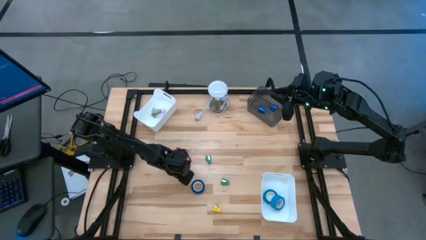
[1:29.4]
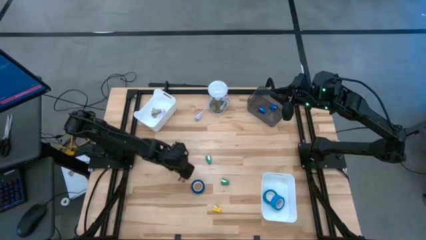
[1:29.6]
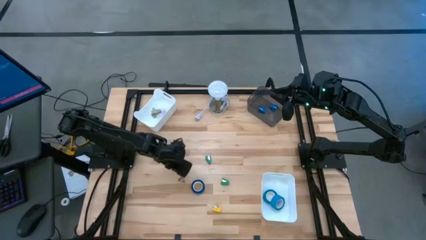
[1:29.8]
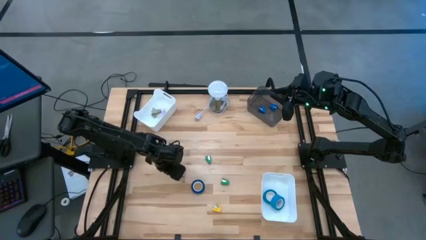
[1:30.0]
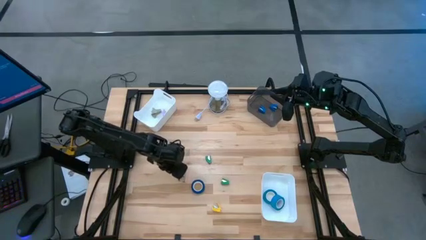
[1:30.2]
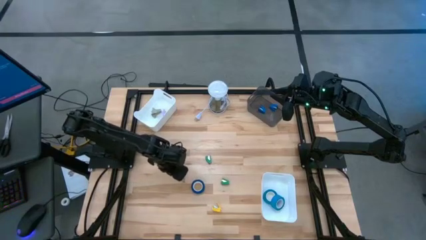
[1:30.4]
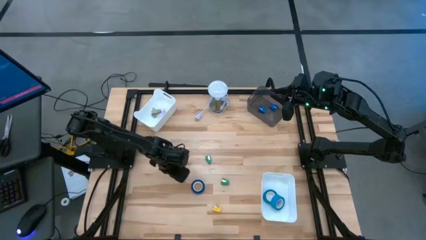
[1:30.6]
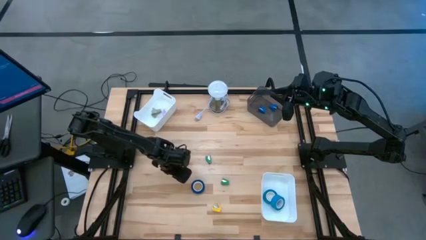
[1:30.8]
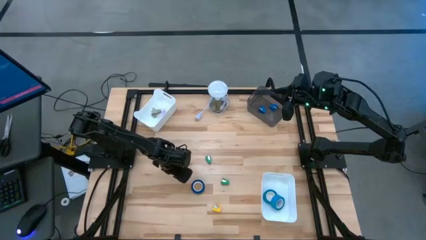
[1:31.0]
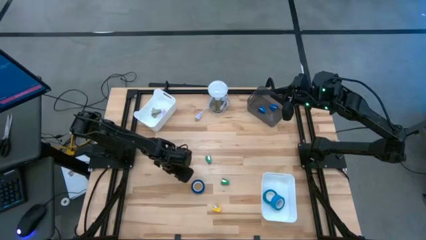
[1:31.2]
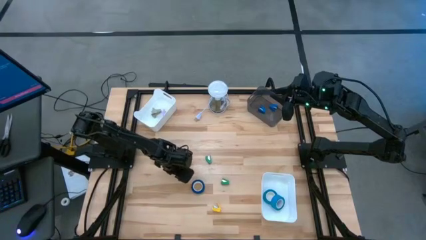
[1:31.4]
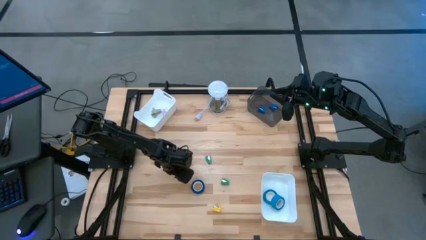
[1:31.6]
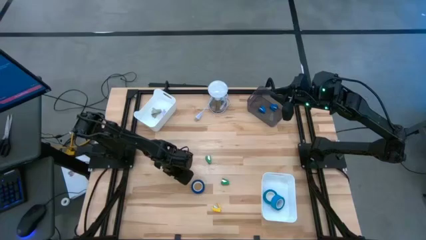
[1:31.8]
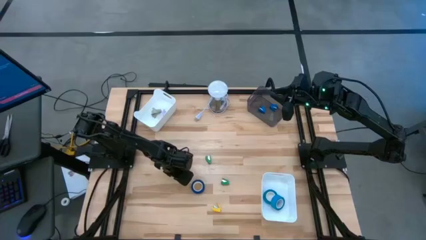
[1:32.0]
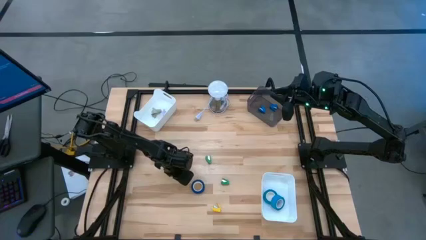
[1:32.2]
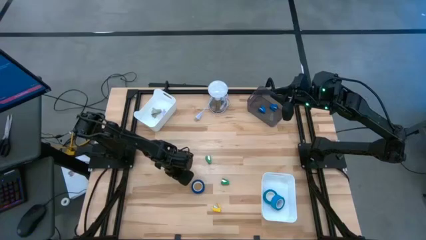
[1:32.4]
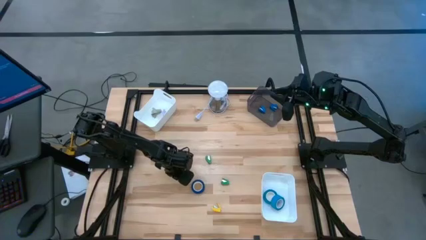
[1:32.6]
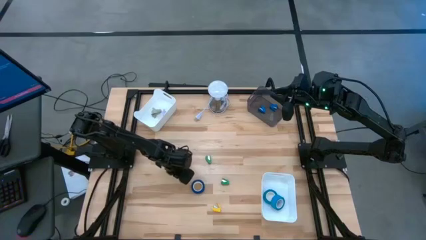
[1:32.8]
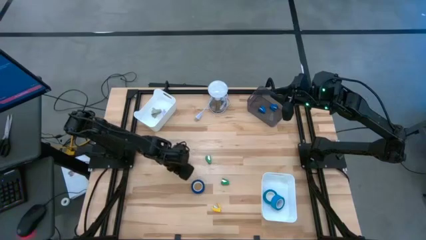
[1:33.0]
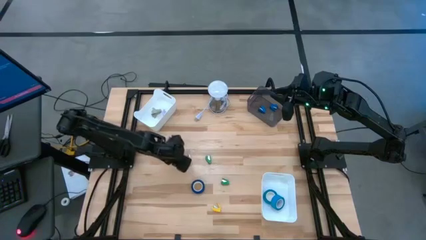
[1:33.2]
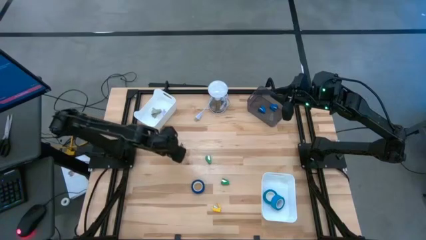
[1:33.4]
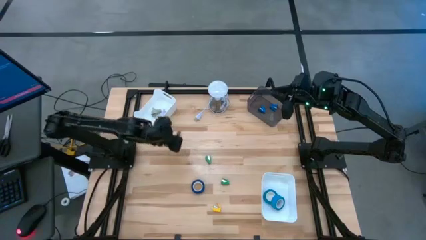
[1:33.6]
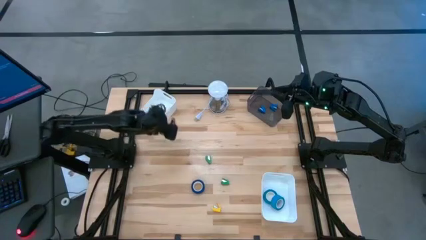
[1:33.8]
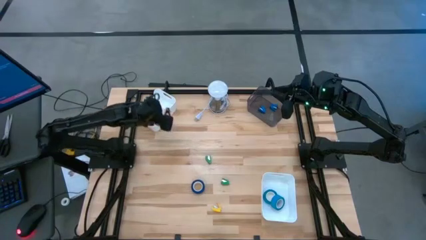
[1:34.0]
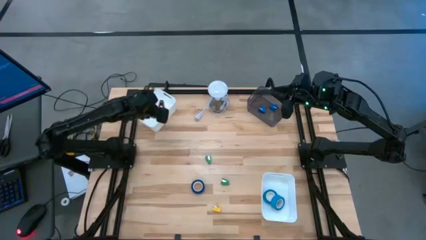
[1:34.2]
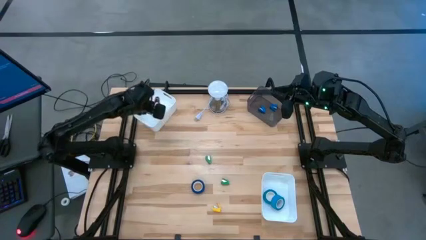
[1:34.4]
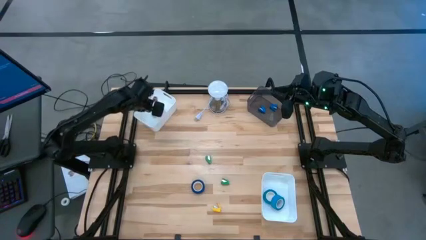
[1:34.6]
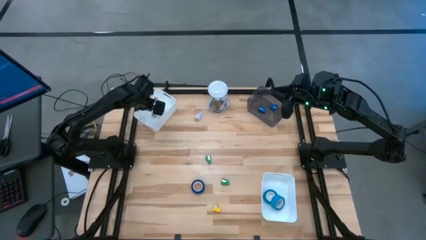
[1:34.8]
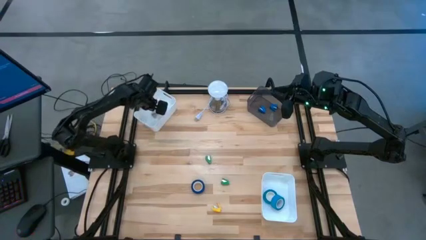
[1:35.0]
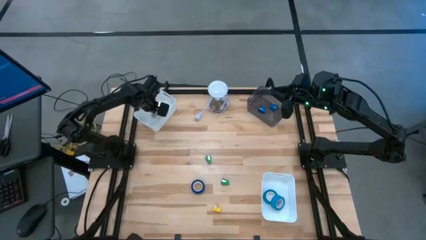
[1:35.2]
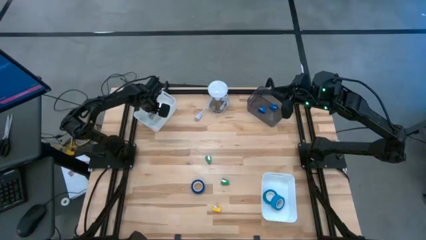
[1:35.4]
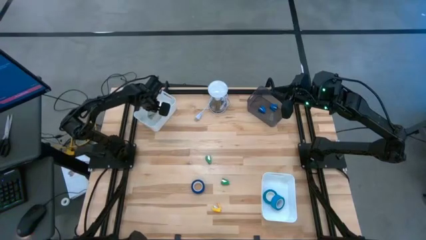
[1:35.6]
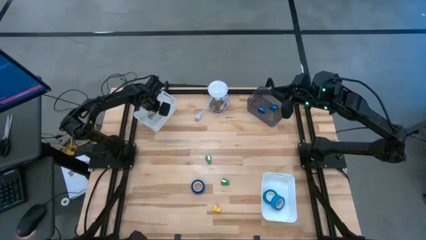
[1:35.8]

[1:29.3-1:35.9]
Task: Pick and place Stapler, Stapler remover, tape
Put the pink staple remover into the top white bin

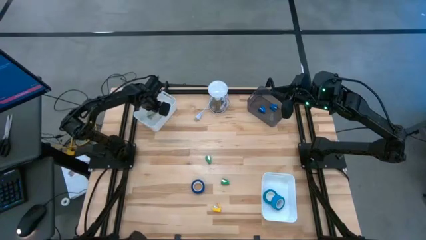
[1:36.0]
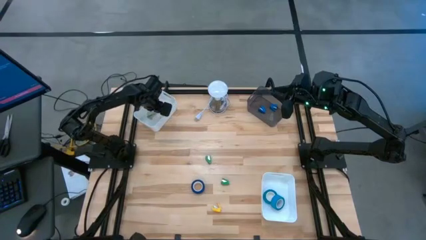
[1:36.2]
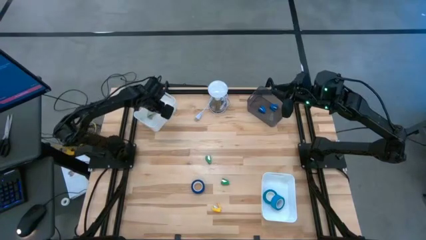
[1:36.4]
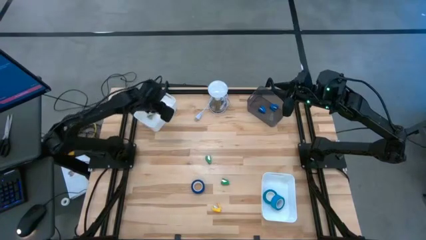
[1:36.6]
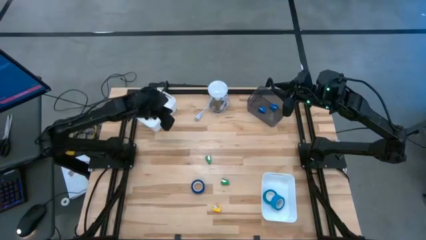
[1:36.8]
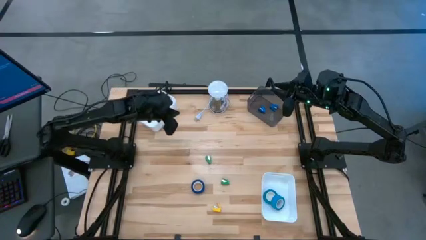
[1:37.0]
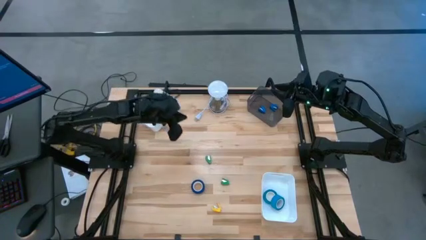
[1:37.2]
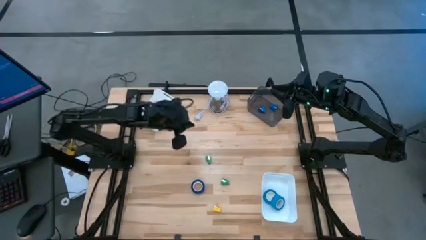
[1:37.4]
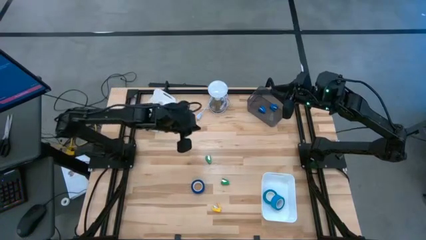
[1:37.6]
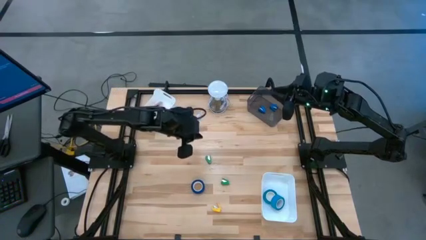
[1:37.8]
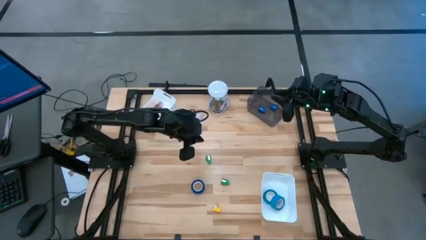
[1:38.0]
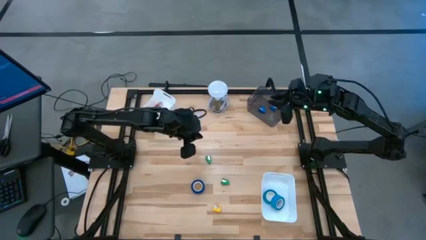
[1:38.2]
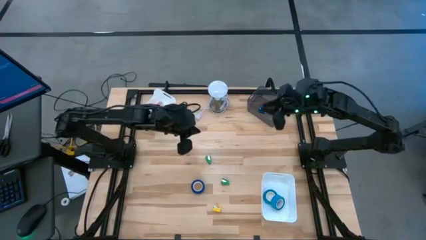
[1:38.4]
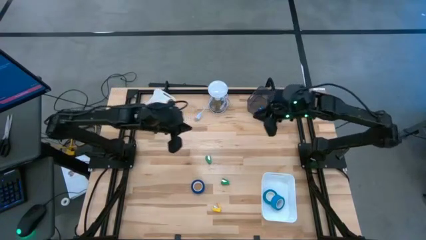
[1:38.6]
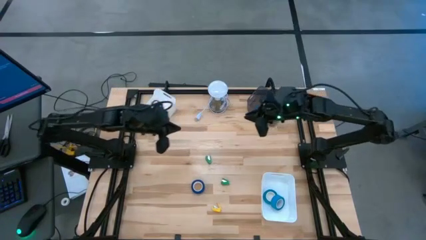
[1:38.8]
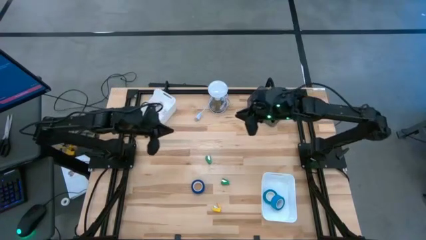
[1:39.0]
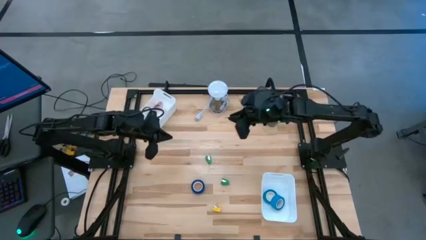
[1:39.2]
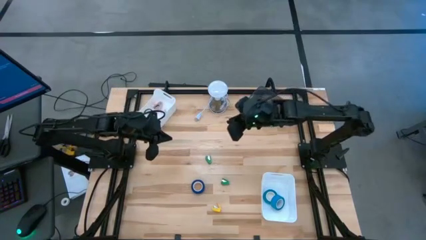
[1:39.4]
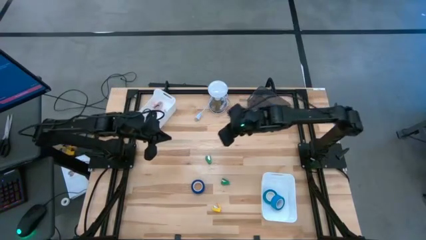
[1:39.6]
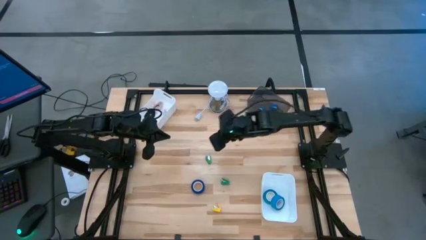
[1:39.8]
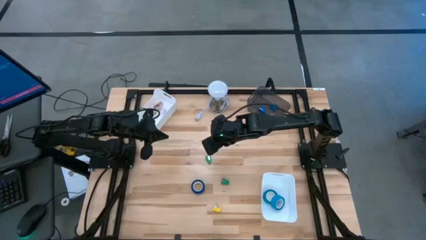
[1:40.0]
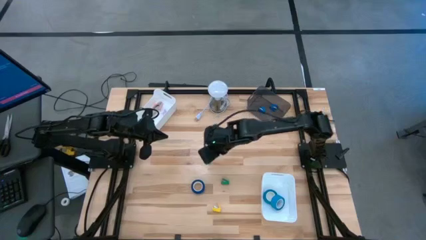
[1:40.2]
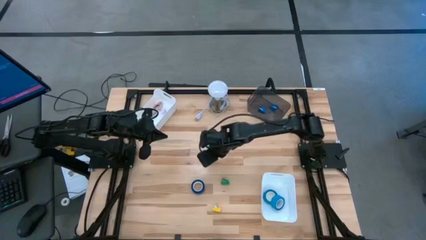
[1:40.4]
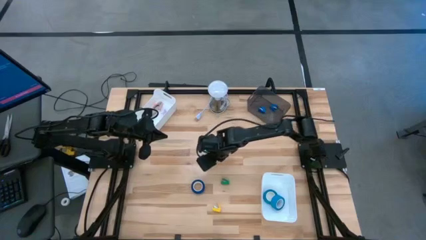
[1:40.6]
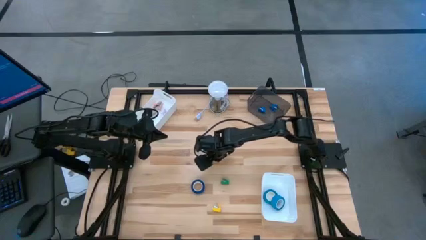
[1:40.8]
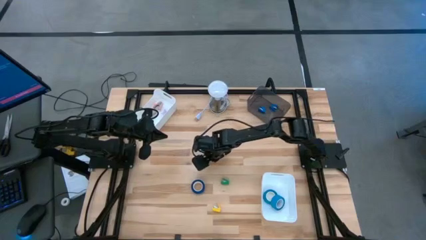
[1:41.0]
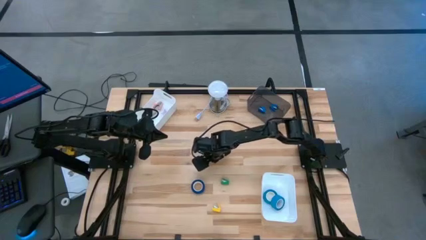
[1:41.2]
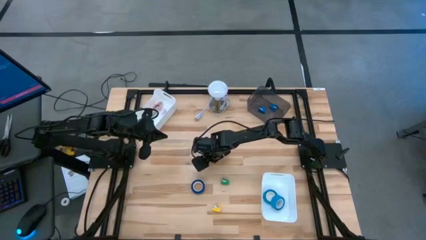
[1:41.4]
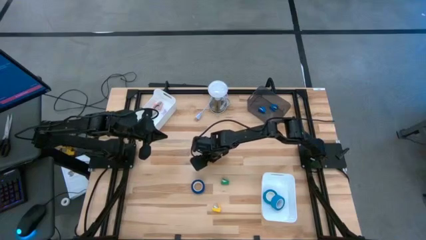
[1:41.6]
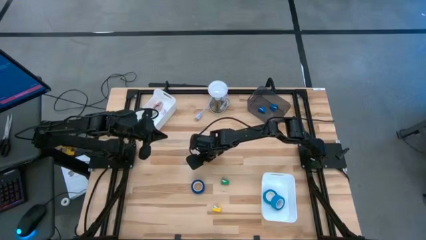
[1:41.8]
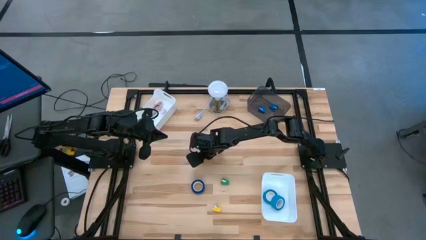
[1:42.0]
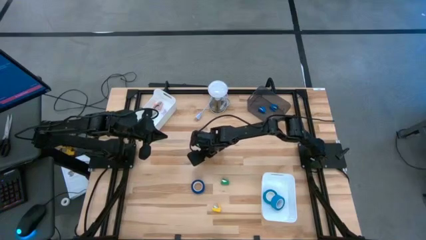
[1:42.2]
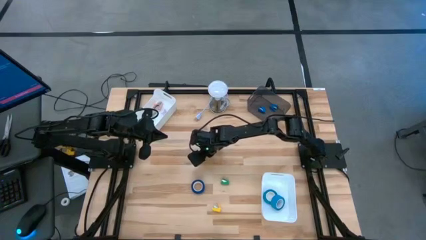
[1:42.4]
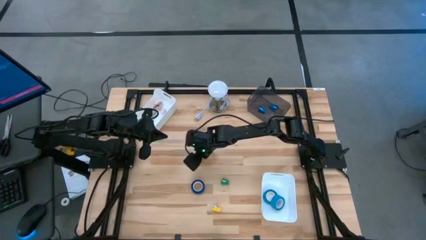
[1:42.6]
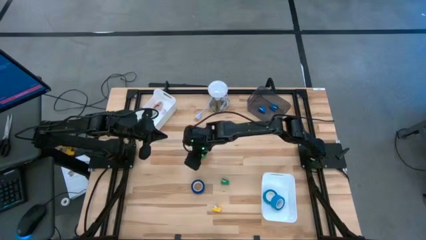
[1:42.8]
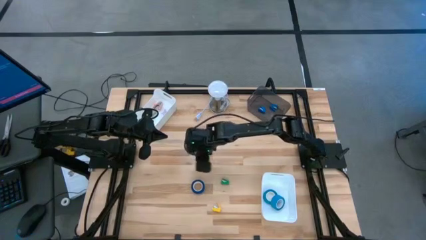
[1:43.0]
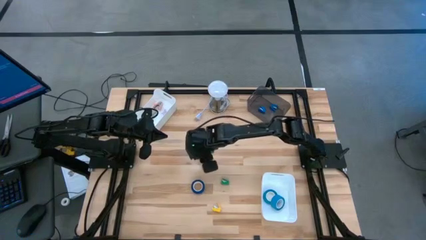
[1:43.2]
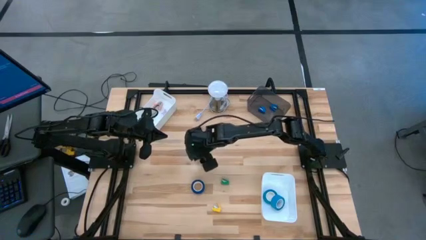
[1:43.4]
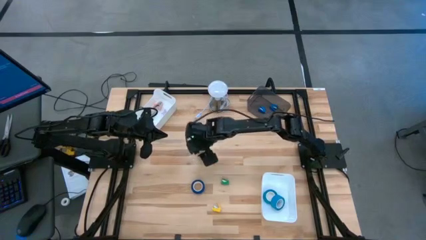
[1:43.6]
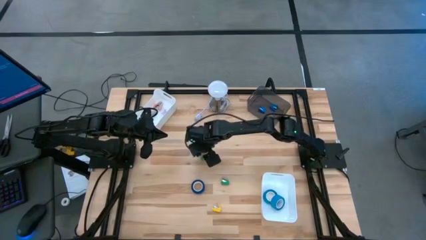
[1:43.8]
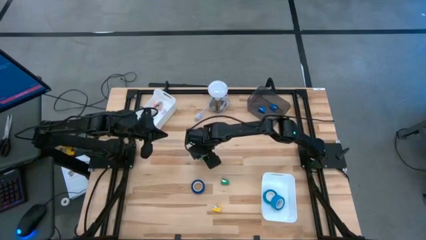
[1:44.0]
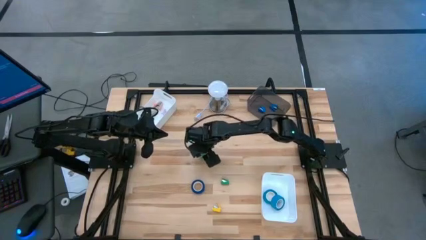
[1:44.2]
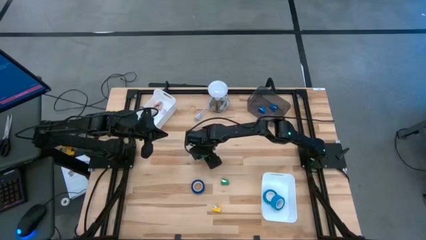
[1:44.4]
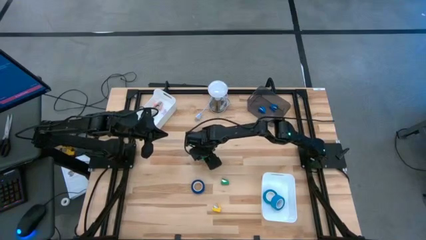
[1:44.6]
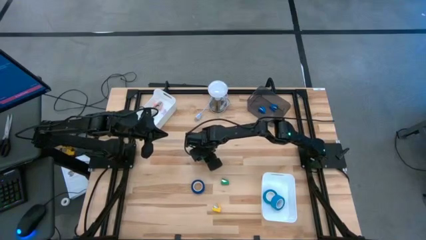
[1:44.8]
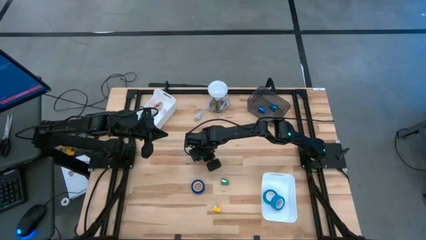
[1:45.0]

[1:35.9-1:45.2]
Put the top green stapler into the black bin
